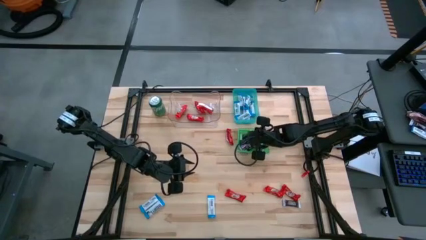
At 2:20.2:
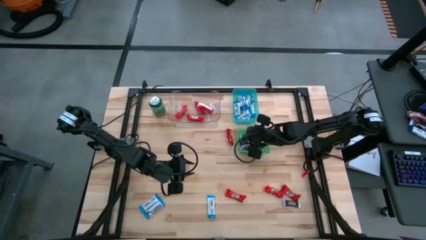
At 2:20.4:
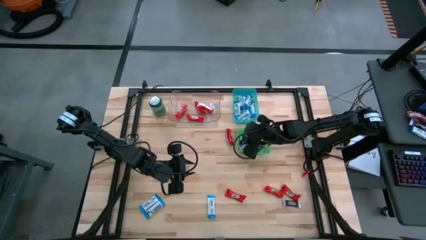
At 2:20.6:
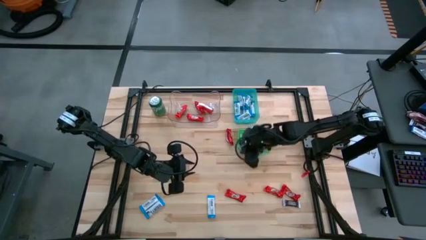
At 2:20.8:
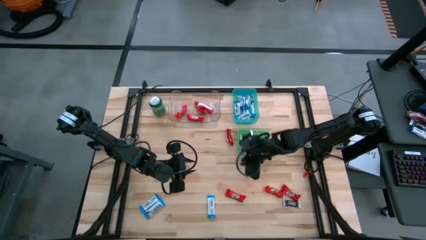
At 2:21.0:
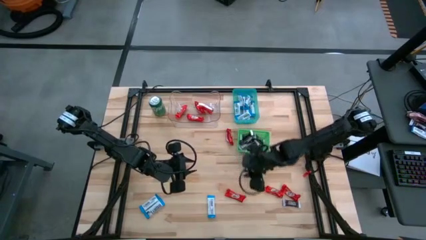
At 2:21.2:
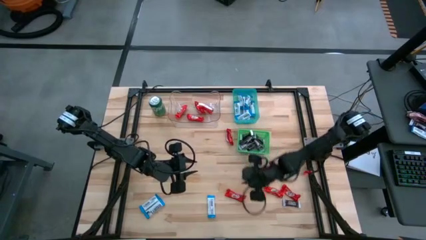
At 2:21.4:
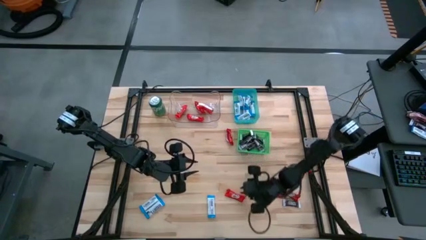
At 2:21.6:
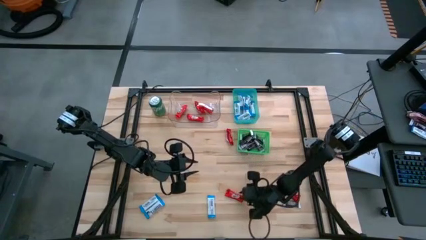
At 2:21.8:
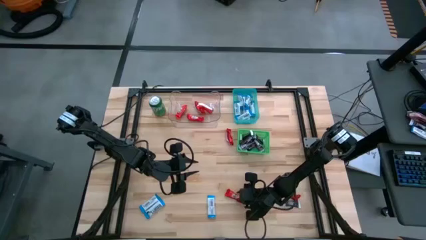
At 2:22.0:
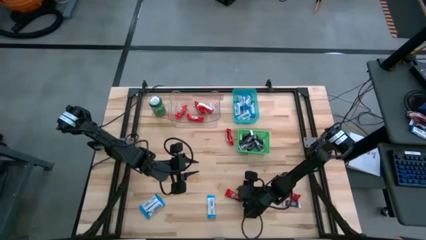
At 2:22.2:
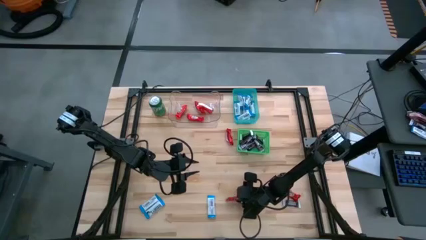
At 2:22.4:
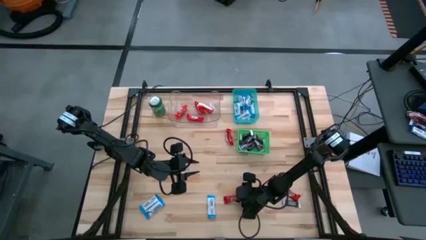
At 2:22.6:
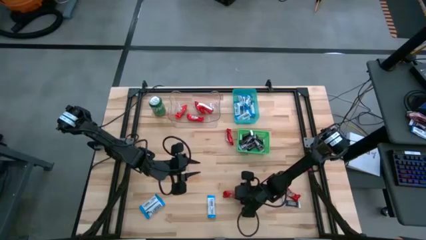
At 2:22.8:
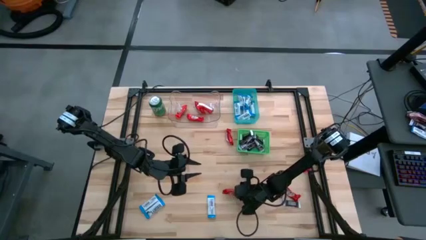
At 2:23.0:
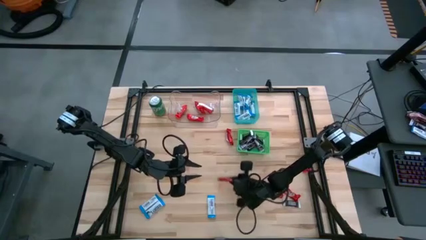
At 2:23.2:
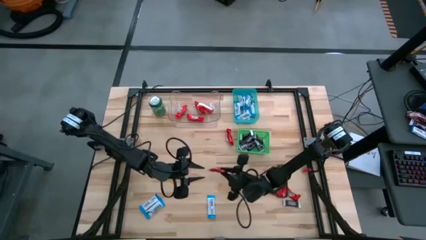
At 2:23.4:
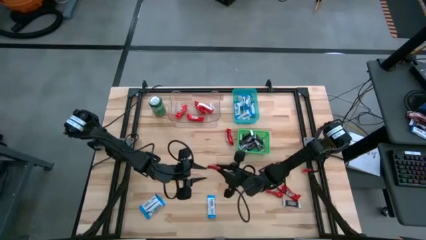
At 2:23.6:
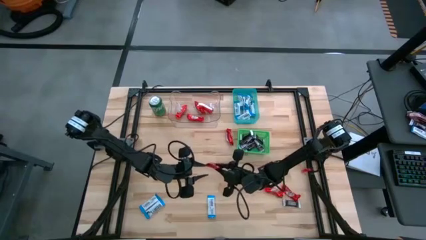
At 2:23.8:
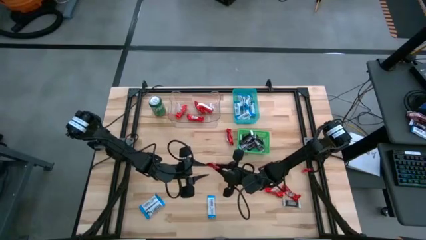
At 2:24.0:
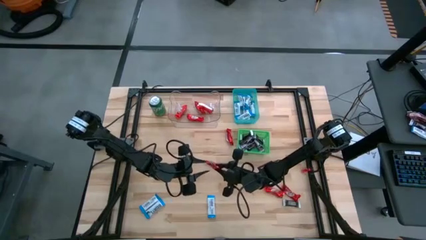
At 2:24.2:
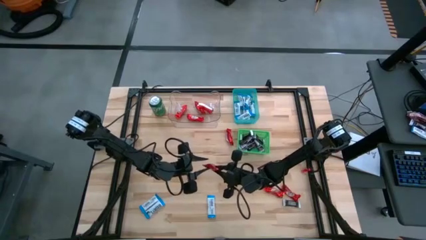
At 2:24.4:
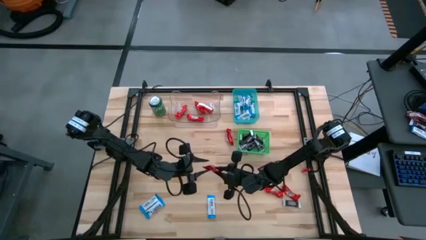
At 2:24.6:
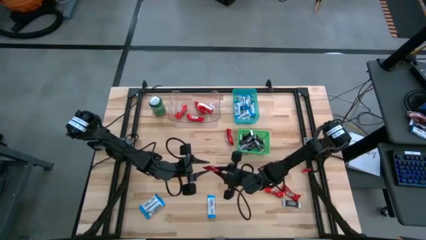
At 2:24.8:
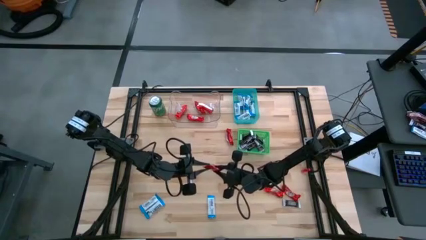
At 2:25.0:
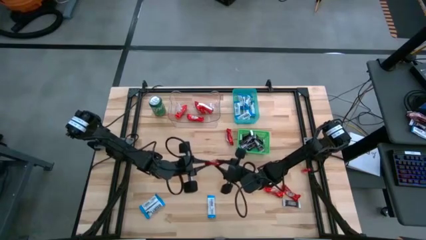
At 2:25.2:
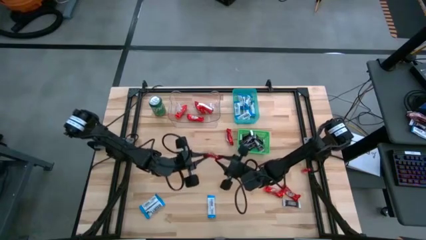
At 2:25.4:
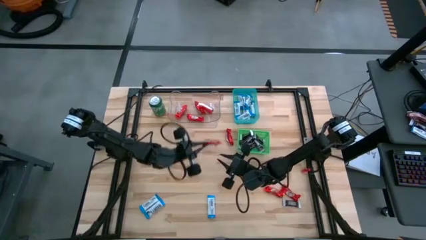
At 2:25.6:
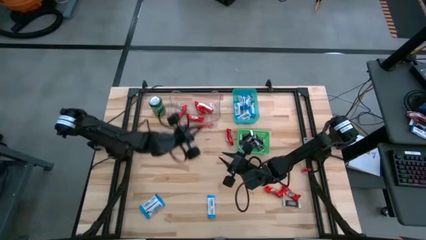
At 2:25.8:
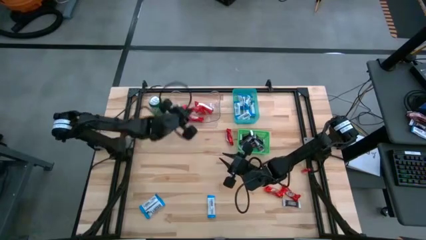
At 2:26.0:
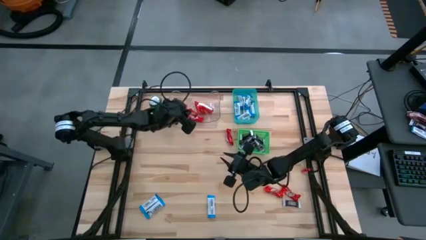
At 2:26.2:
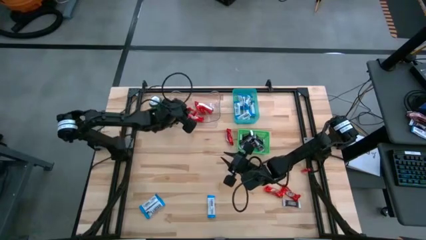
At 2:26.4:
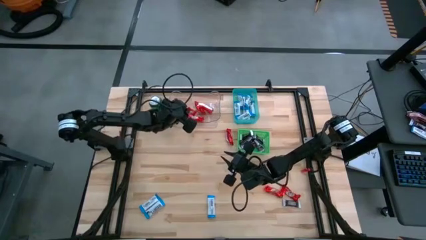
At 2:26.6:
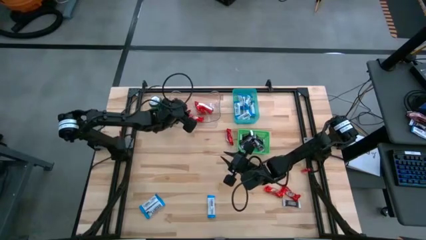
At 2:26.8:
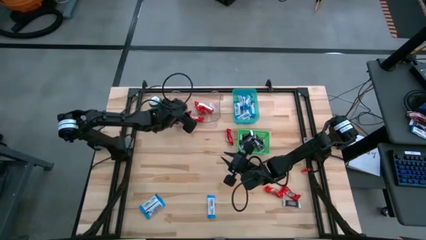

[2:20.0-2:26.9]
Task: Sort candy
Put the red chocolate bar into the transparent bin

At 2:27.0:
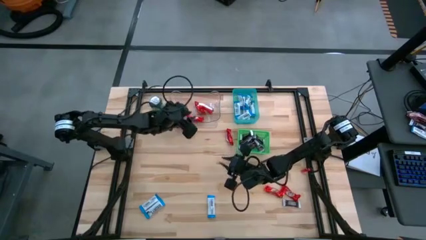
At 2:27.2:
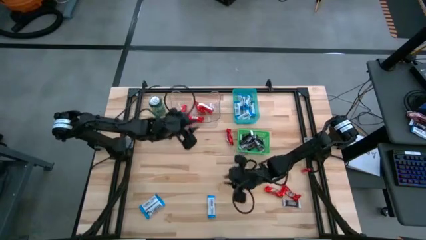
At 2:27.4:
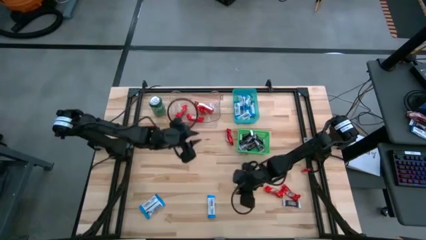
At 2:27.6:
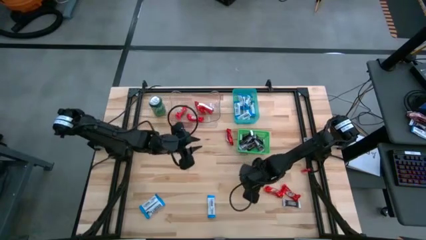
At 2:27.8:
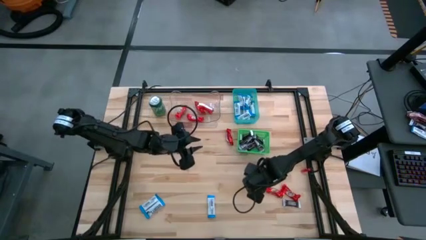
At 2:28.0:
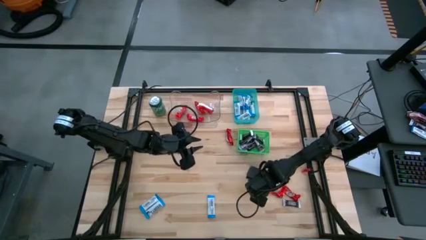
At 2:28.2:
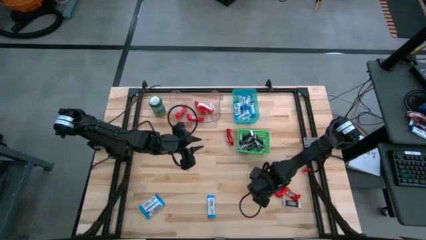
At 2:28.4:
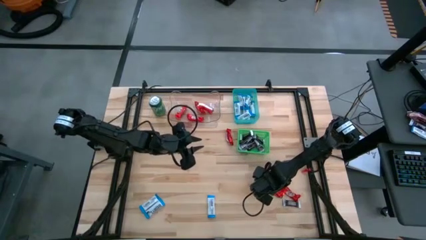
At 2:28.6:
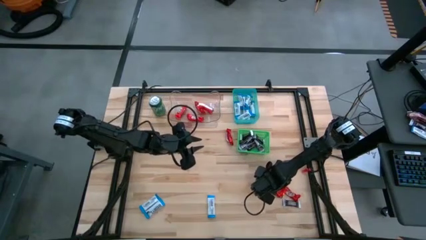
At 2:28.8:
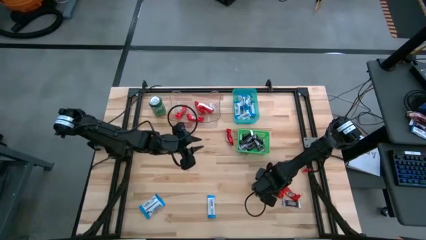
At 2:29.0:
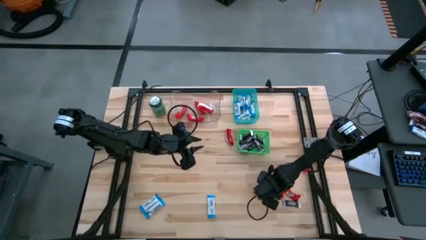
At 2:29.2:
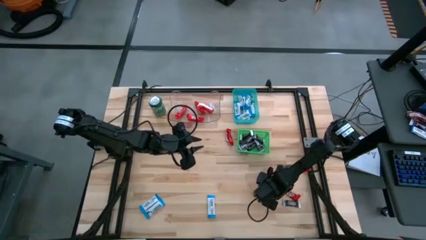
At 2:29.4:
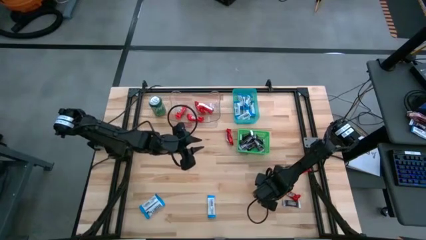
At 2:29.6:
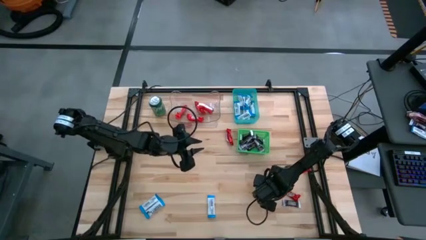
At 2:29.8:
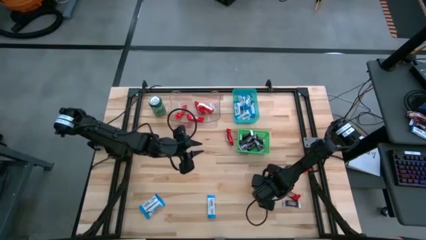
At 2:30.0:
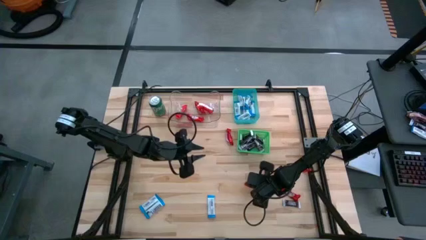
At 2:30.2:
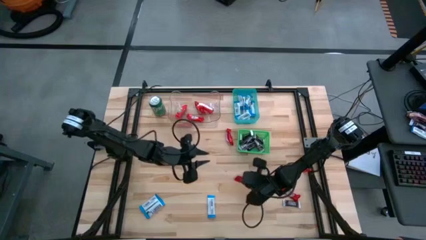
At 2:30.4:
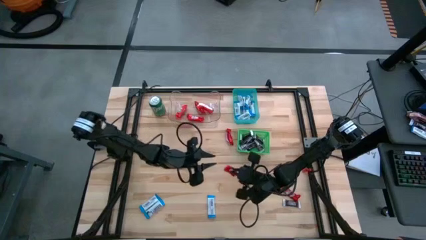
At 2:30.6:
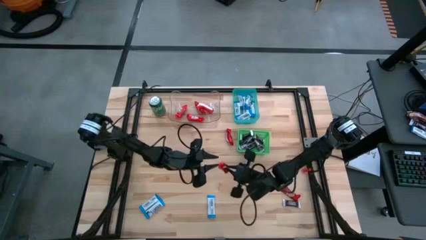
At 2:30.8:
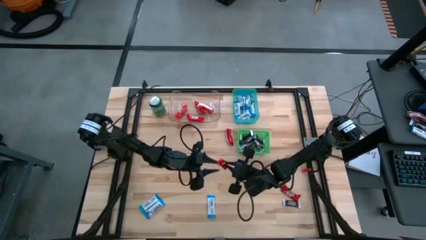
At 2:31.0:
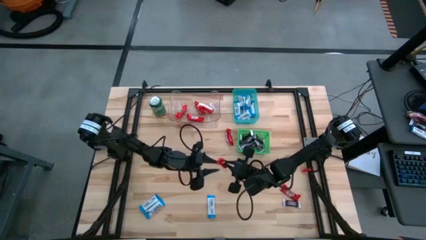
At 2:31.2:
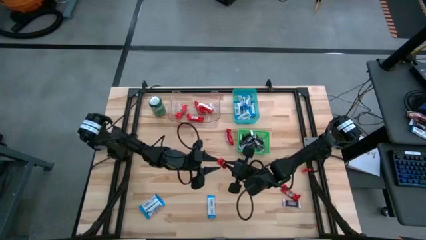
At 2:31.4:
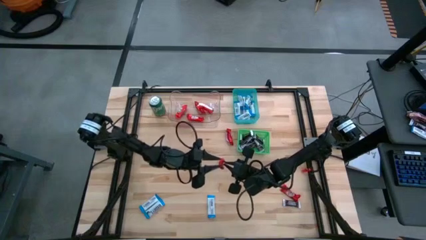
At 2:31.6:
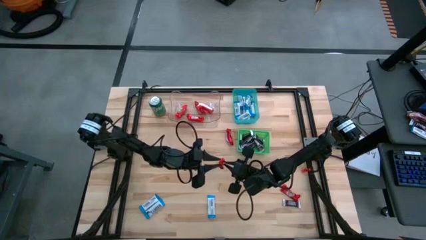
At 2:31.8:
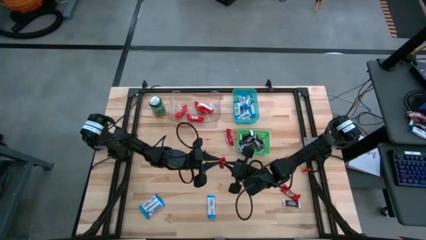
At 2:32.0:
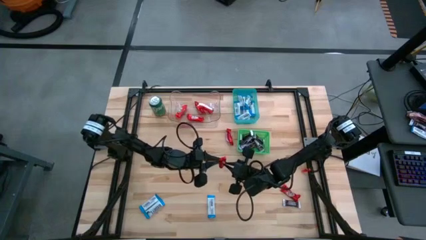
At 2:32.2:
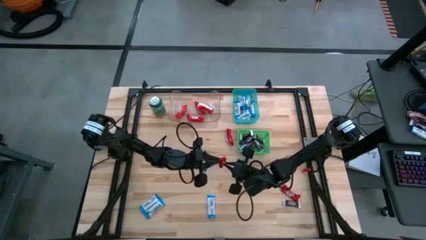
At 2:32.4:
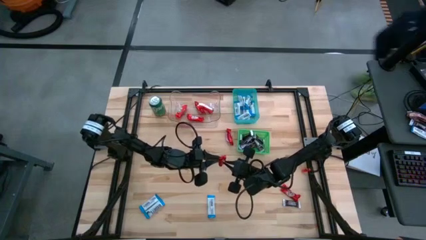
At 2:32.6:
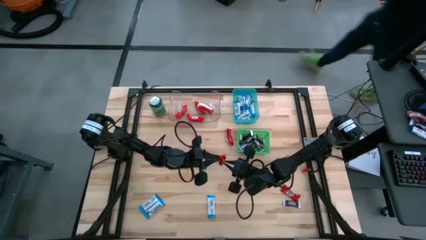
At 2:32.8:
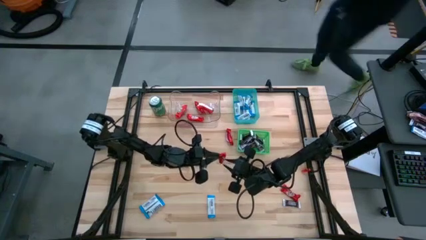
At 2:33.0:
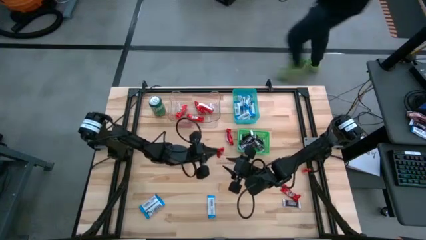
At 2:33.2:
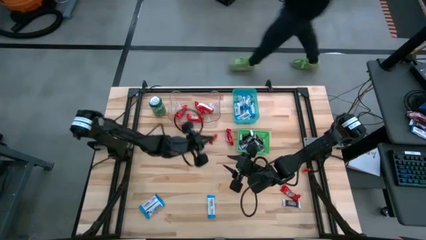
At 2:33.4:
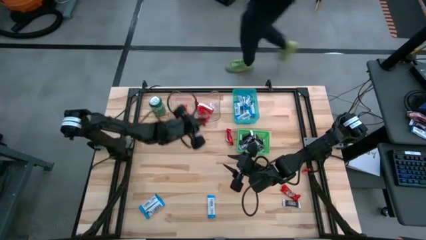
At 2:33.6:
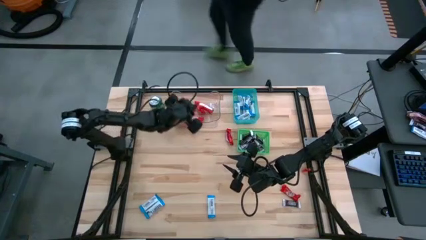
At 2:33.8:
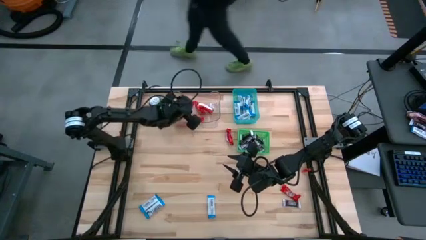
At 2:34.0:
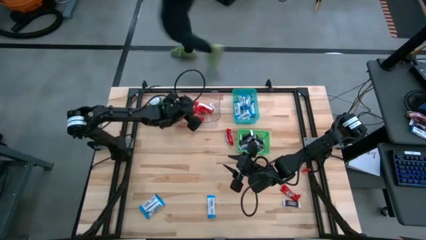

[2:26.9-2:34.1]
Put the red chocolate bar into the transparent bin

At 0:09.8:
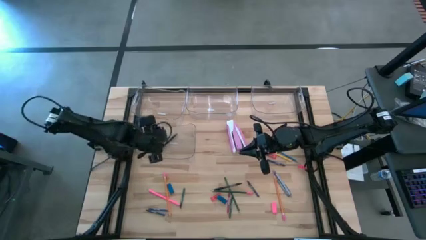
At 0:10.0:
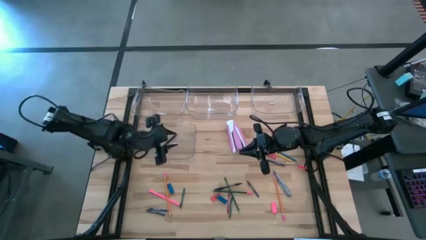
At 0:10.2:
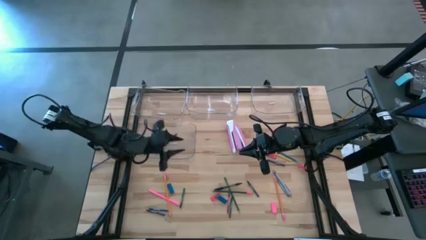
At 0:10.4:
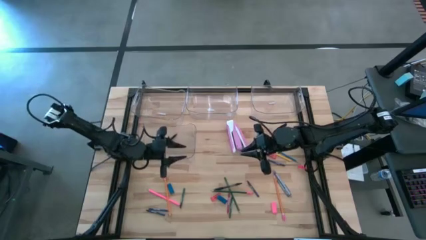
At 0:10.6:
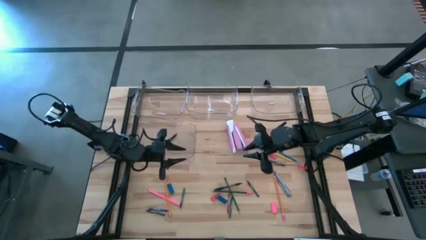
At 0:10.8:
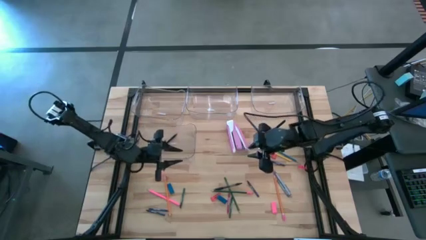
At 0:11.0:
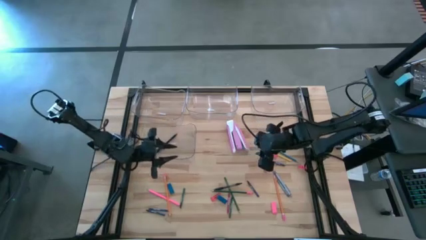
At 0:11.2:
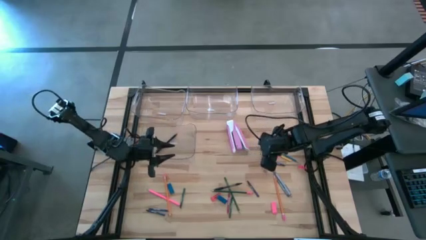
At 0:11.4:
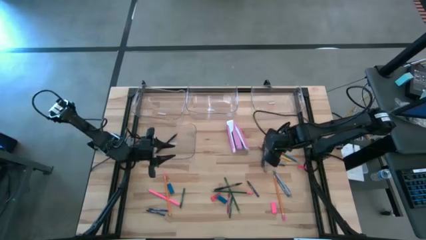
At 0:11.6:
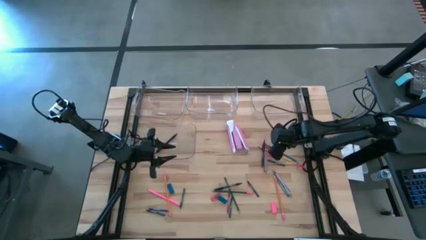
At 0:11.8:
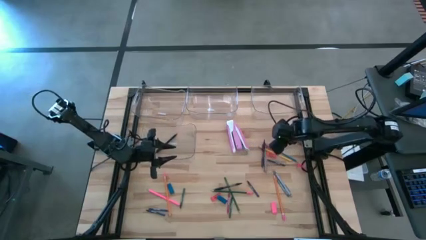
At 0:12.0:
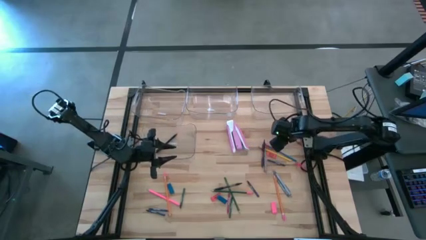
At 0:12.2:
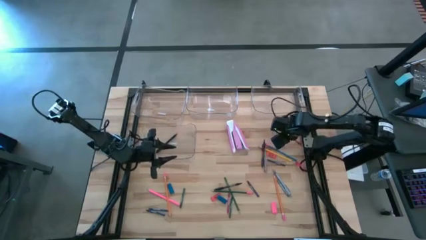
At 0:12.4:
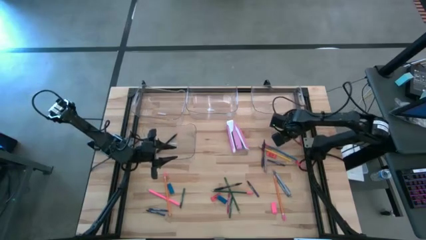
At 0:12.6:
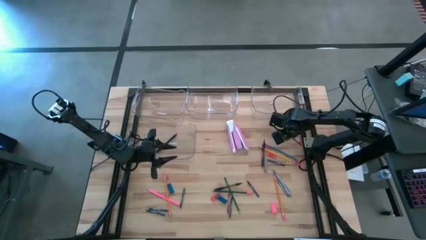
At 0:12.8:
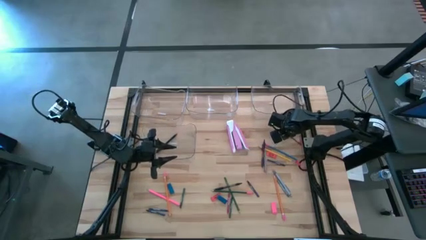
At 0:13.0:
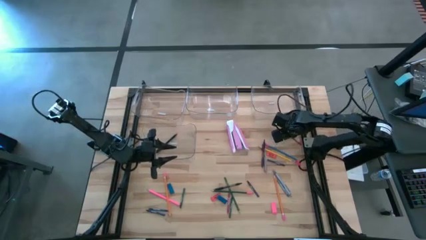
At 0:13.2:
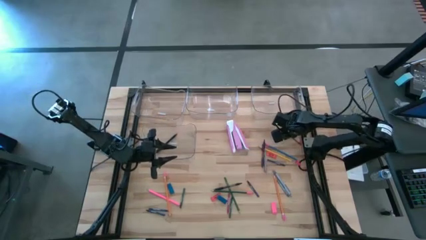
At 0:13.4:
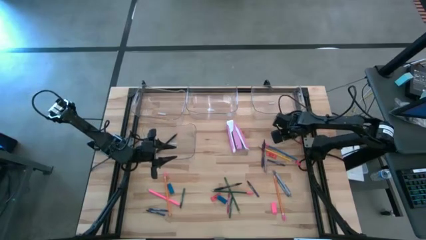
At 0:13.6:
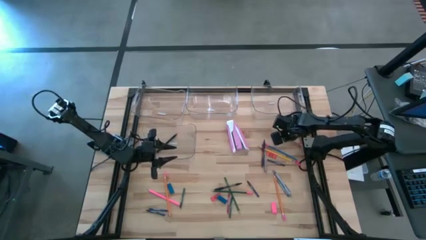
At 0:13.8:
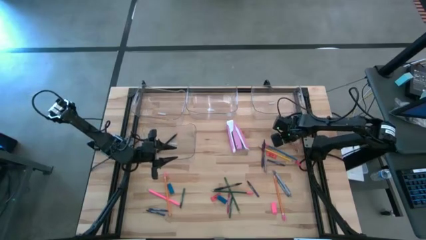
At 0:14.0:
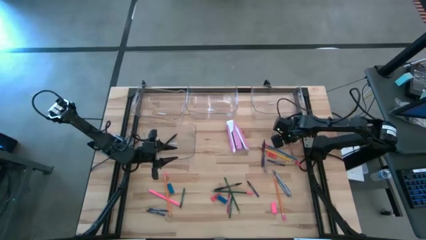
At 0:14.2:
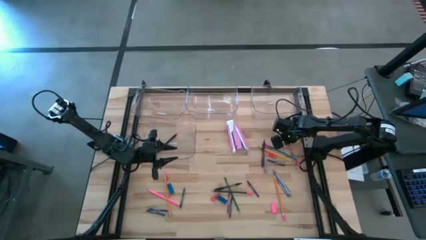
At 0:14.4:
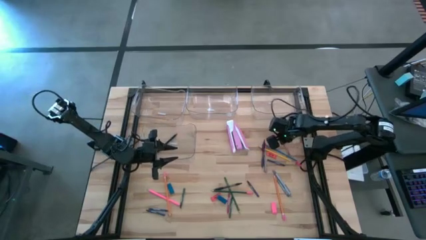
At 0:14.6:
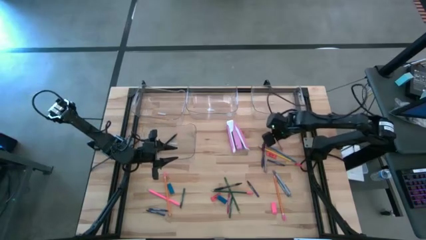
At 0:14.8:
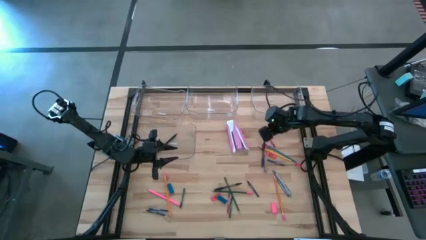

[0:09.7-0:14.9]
Task: Sort crayons/erasers/pens/pencils in bins
Put the red crayon into the top right transparent bin
